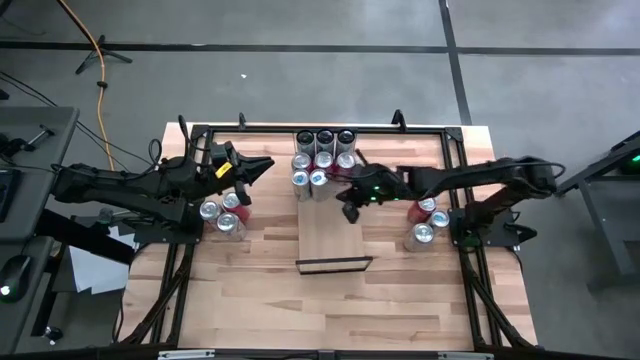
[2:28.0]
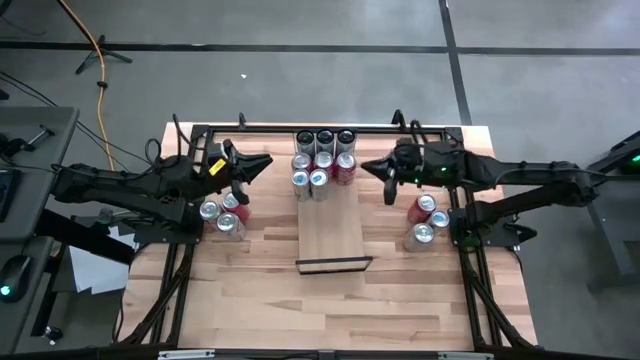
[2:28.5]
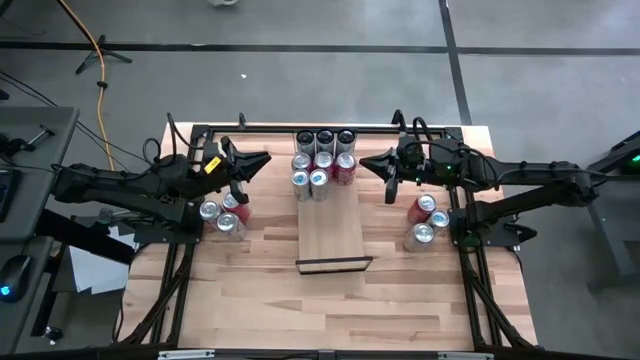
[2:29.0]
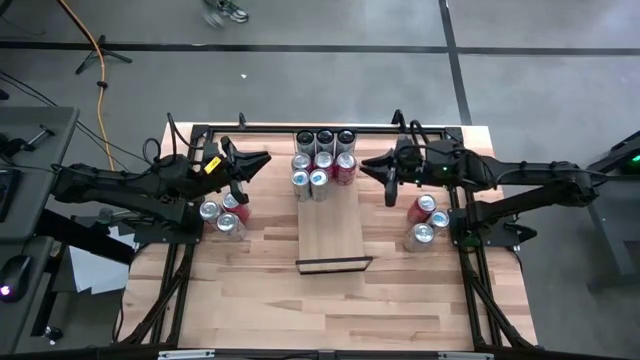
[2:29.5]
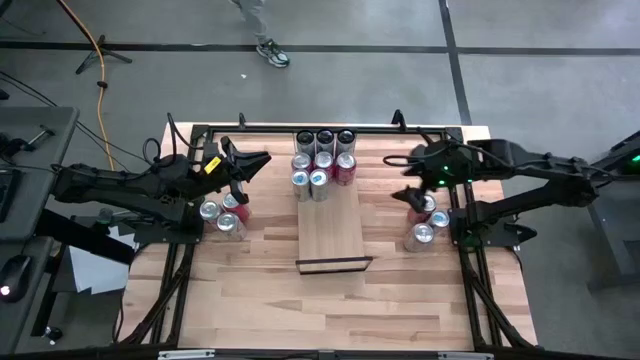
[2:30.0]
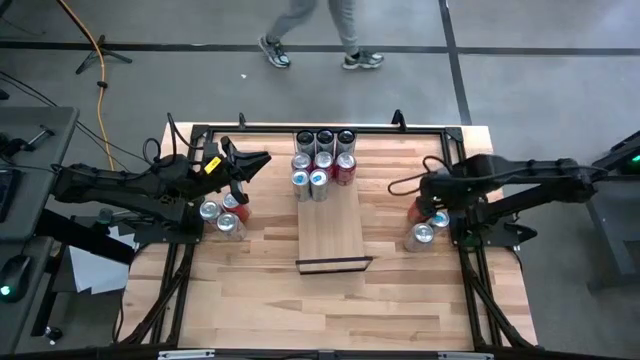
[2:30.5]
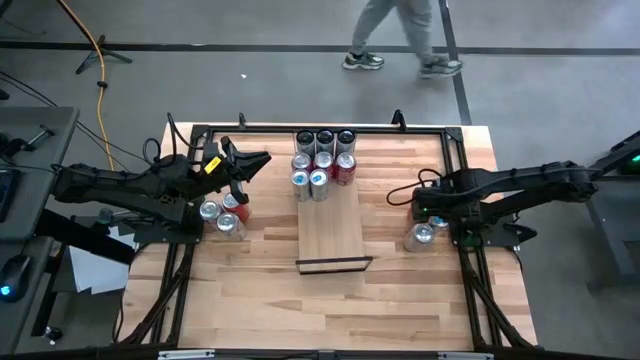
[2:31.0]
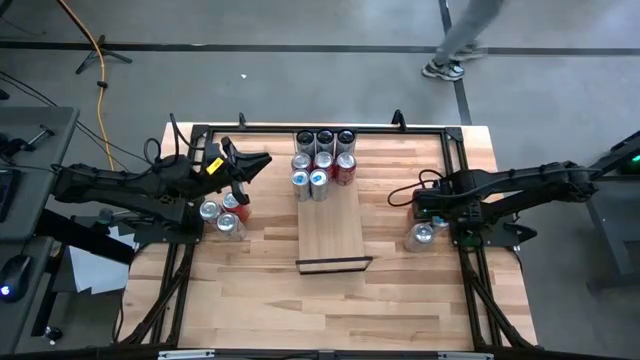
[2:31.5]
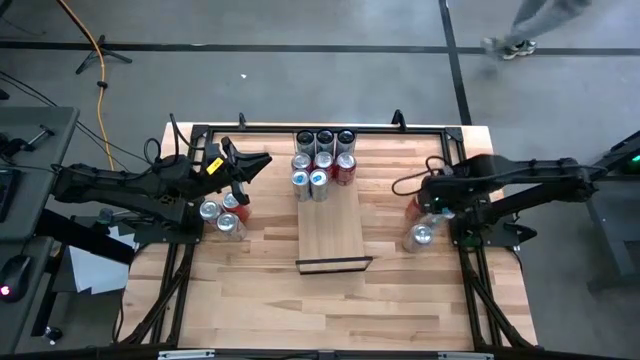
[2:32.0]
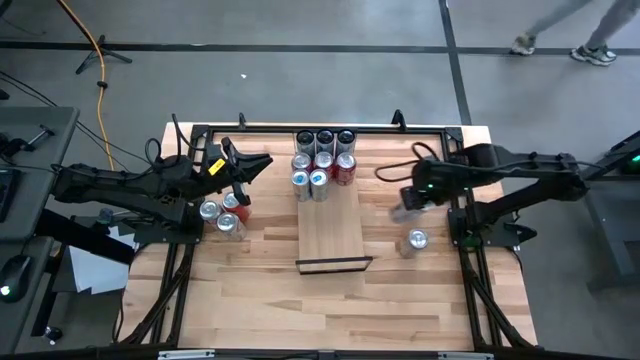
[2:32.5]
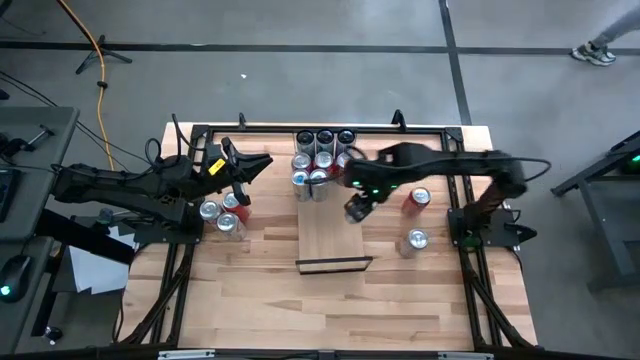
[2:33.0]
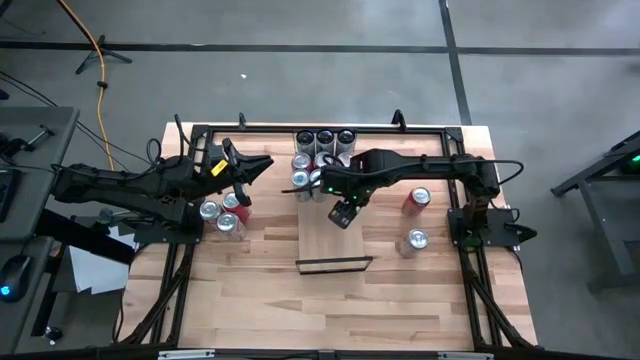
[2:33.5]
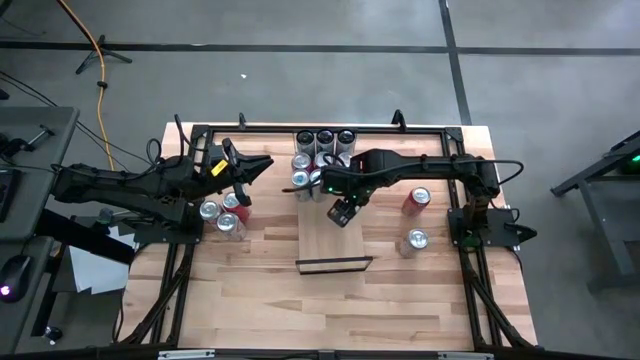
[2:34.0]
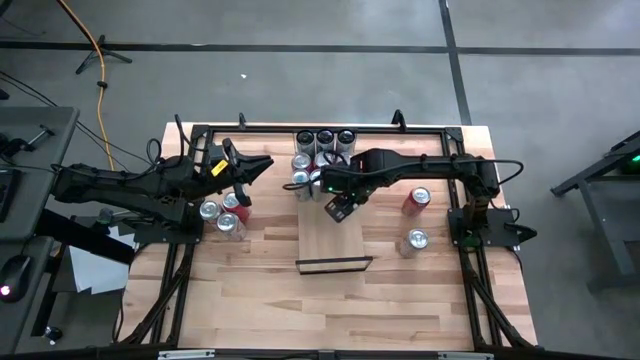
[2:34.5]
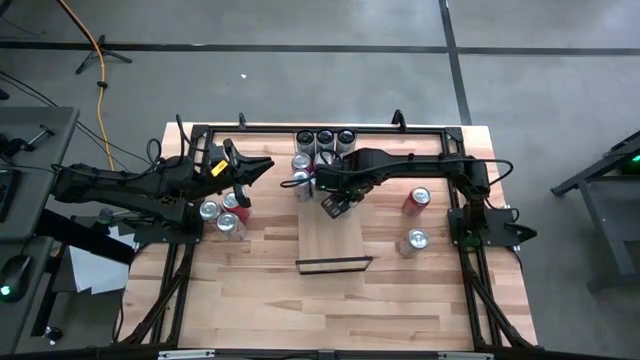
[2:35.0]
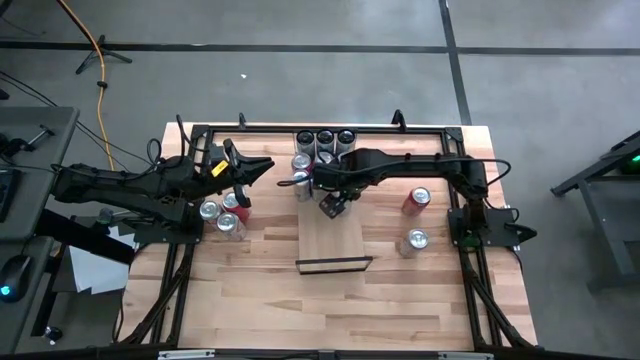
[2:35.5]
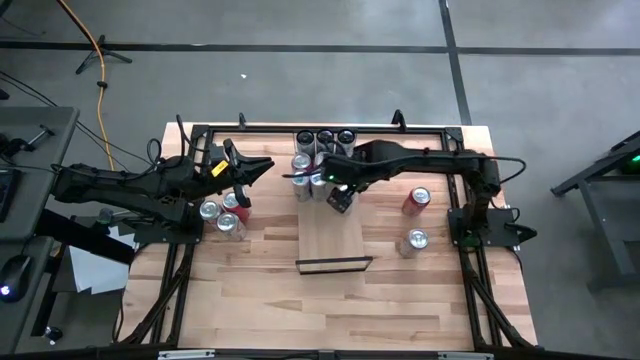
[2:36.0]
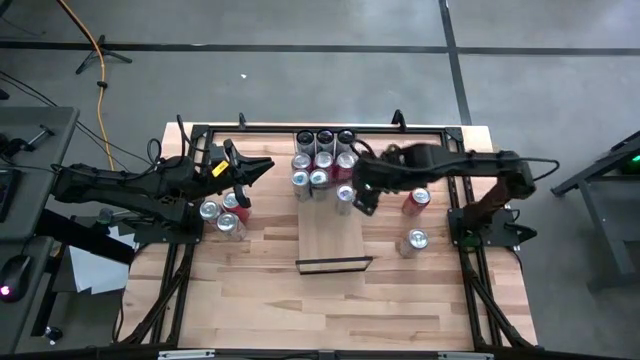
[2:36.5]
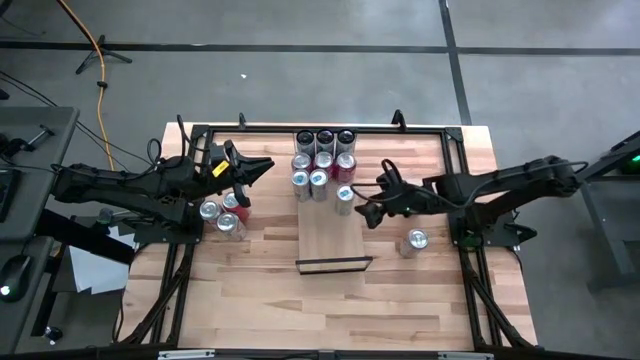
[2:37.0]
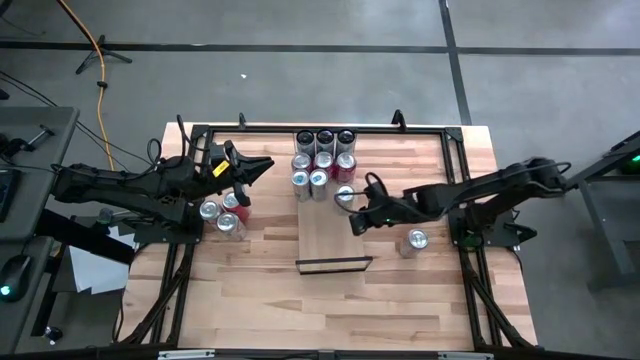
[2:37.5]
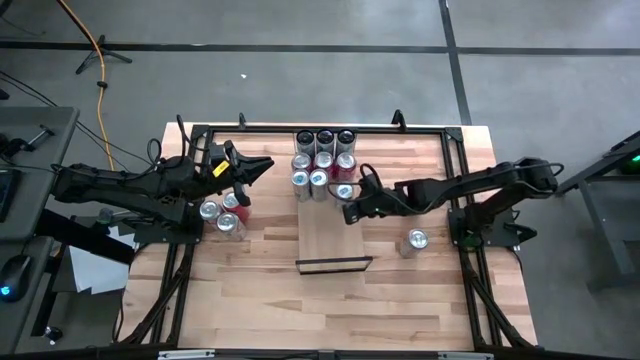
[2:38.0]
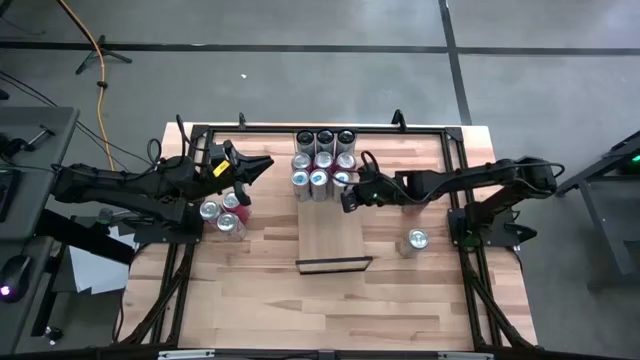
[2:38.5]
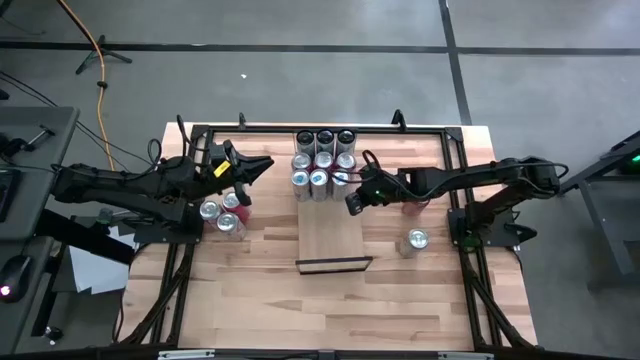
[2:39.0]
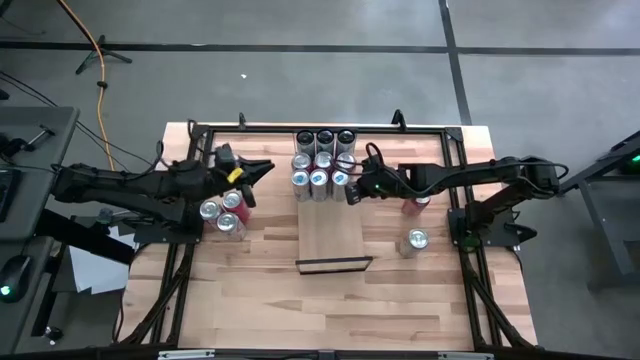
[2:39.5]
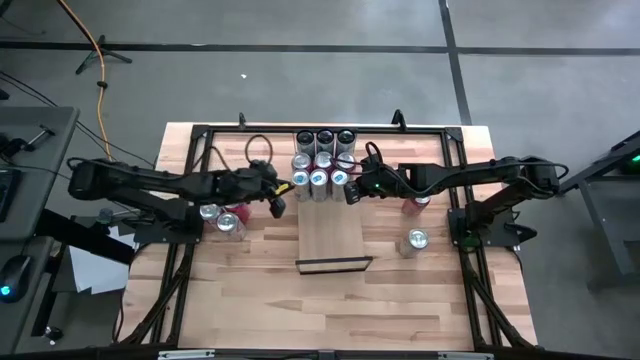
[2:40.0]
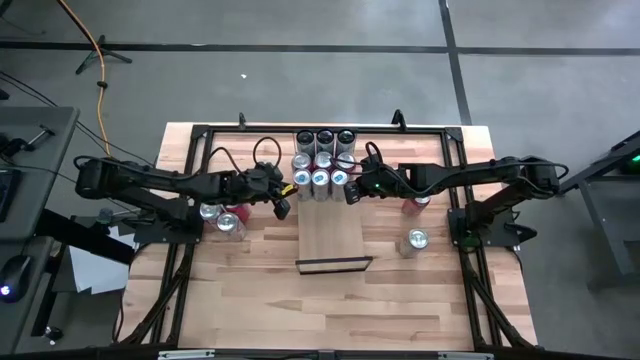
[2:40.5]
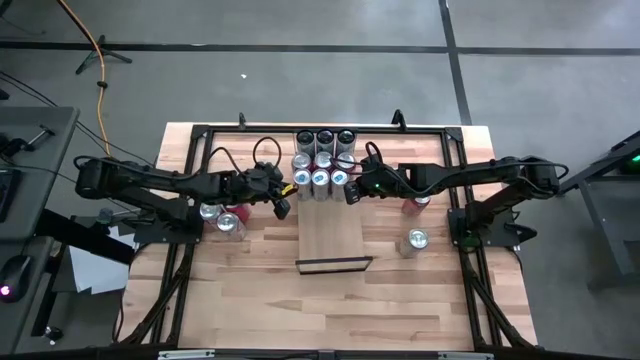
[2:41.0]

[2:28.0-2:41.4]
Task: Place canned beverage on shelf
Put the blue soda can on the shelf aligned with the other blue soda cans

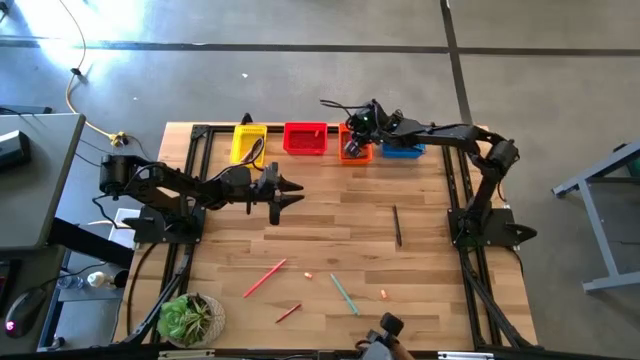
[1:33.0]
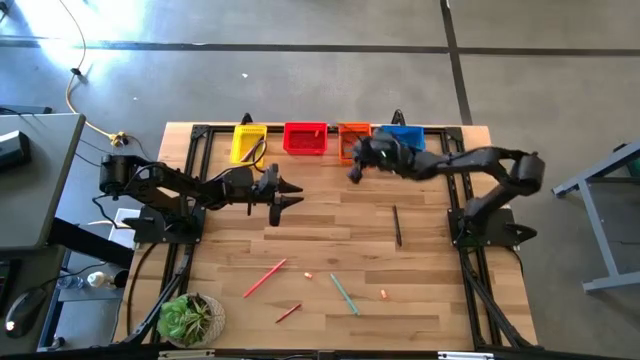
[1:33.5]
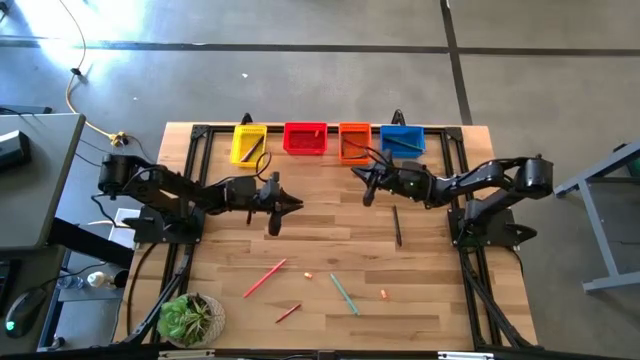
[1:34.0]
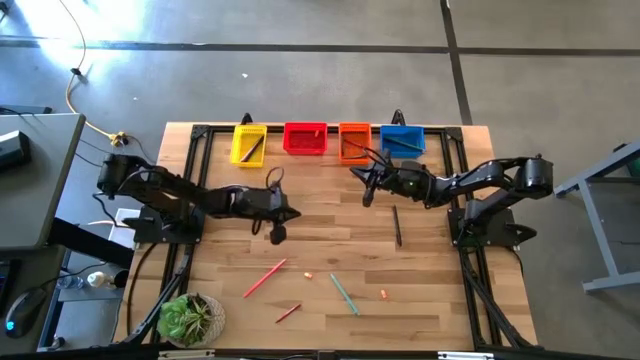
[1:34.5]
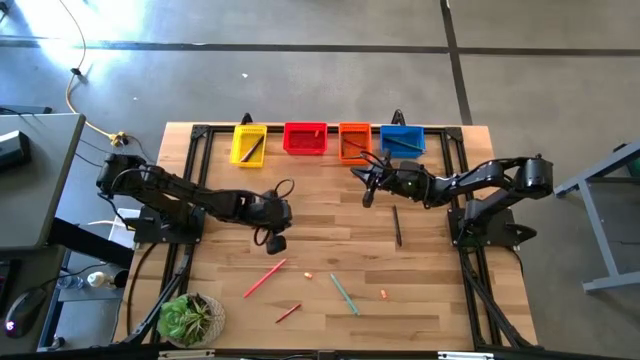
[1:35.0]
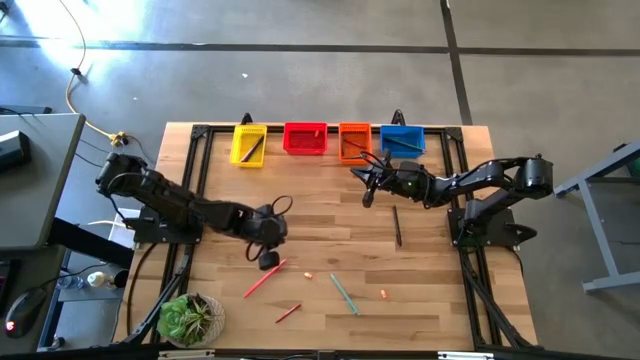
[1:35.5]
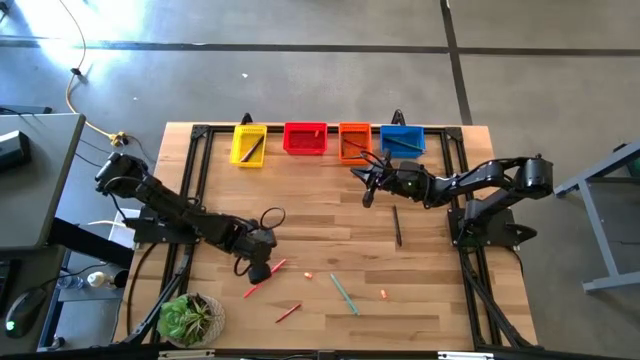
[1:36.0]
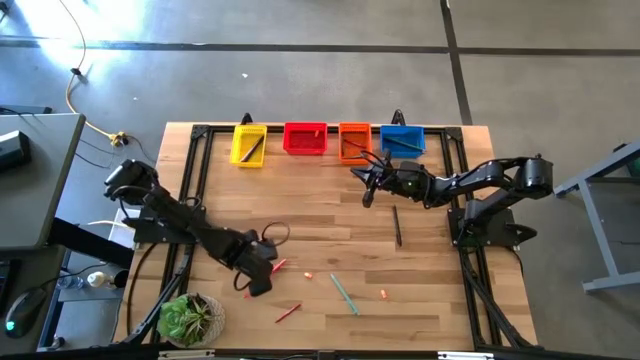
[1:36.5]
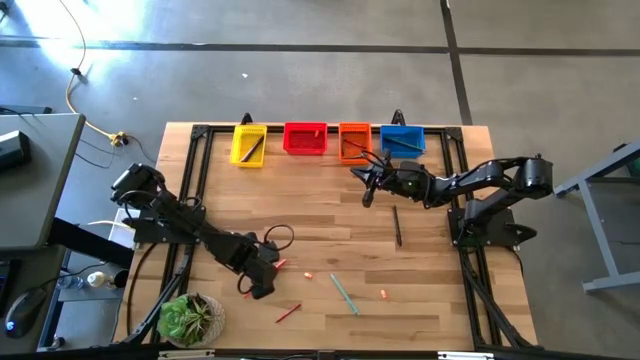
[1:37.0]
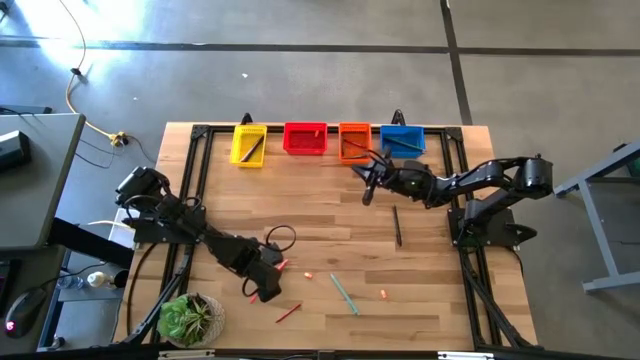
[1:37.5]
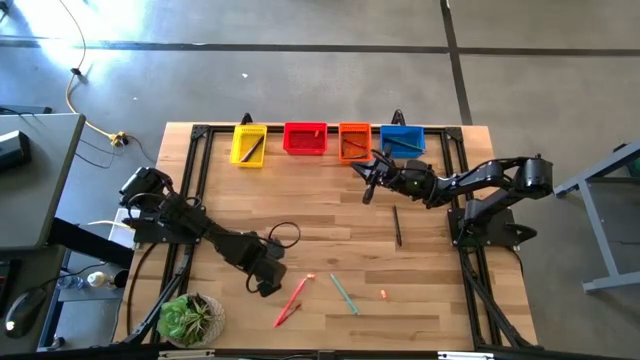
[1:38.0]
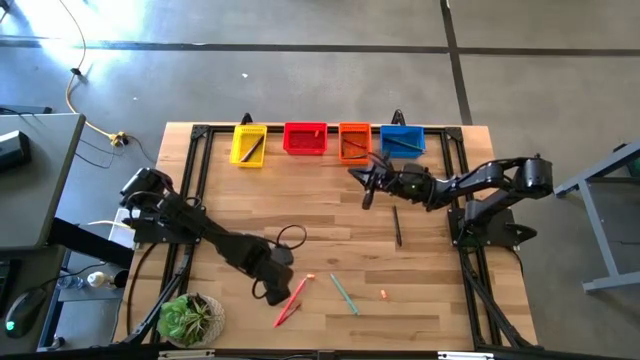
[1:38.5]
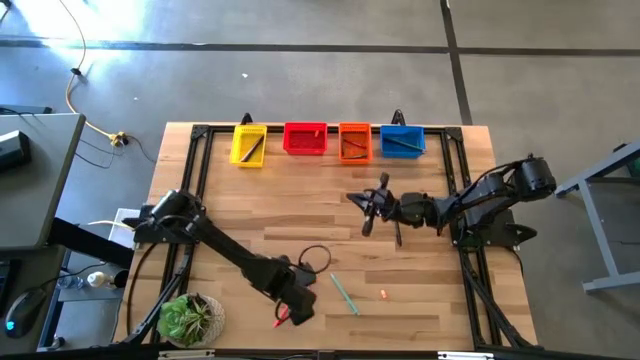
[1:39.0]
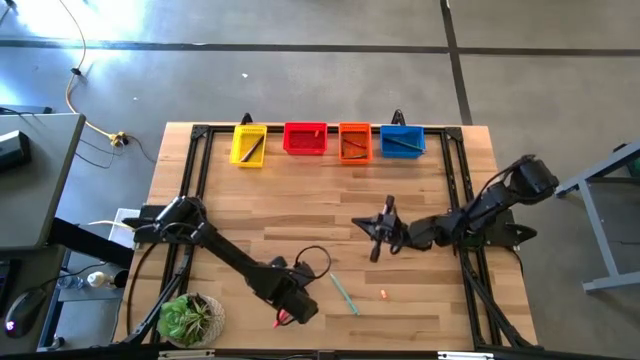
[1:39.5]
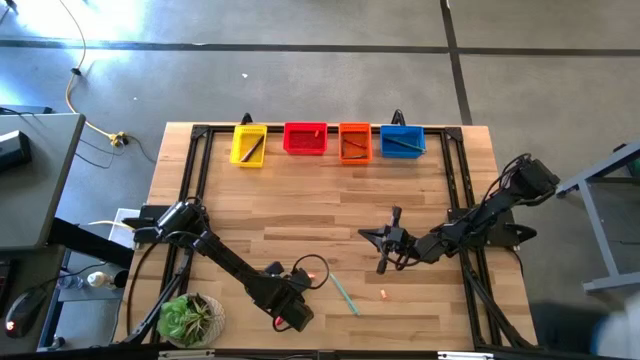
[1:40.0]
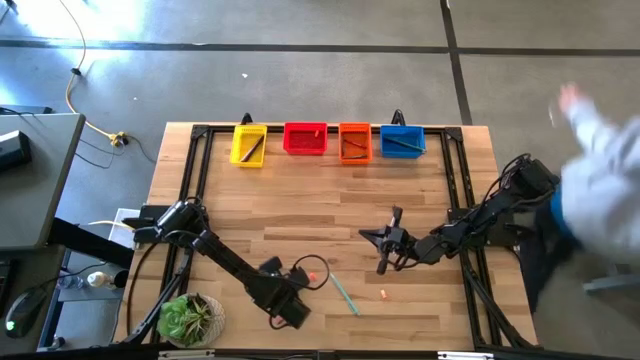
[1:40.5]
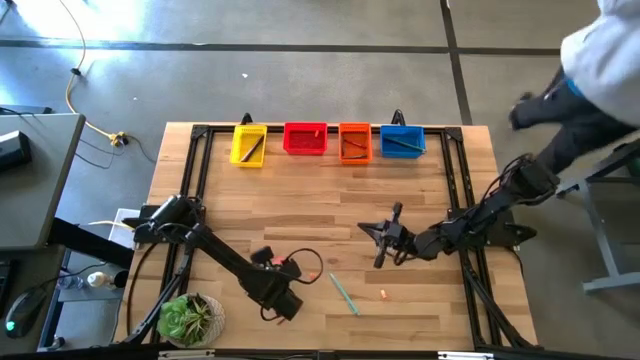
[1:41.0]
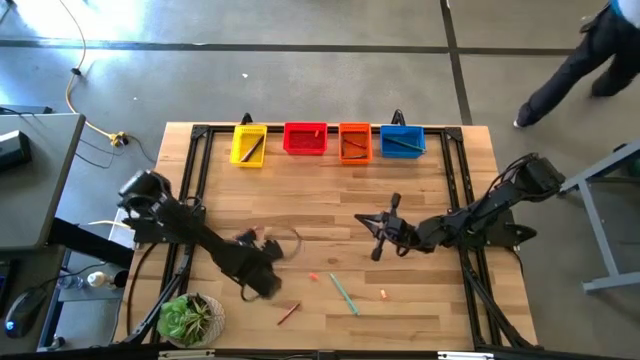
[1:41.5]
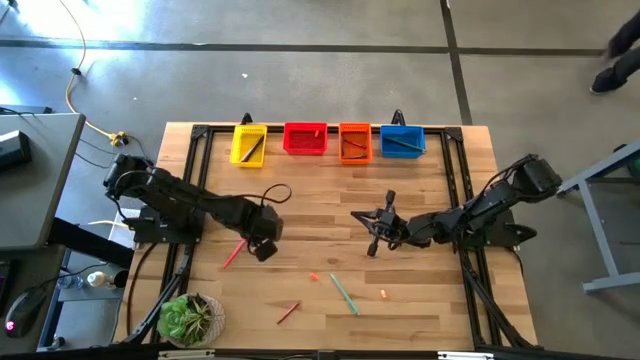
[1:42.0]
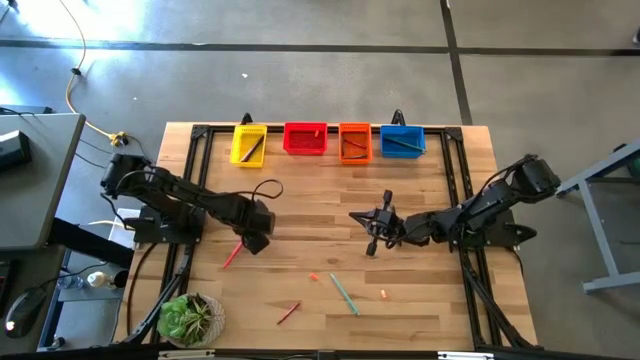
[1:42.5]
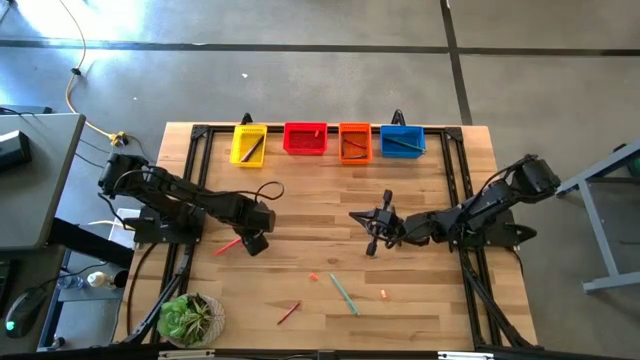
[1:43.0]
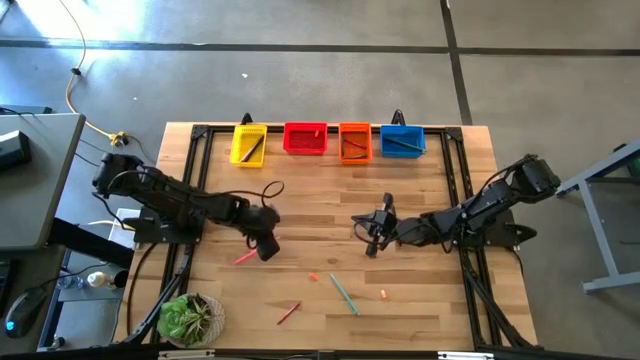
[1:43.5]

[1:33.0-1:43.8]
Task: Sort crayons/erasers/pens/pencils in bins
Put the pink pencil into the blue basket
